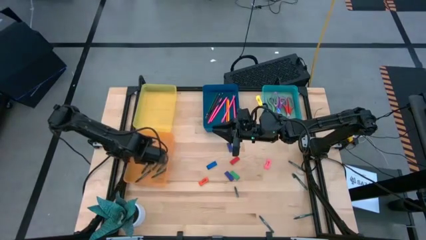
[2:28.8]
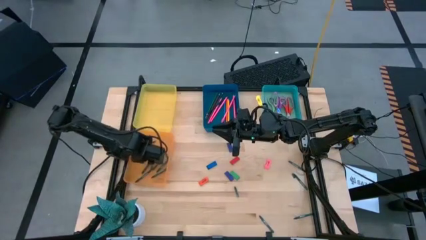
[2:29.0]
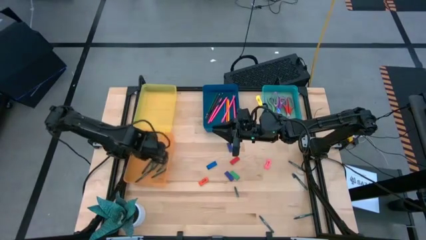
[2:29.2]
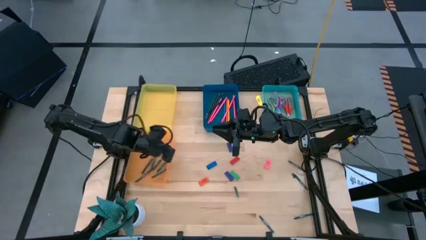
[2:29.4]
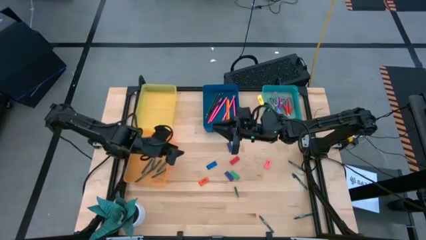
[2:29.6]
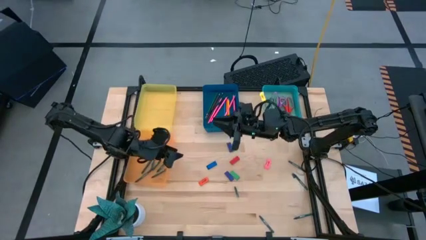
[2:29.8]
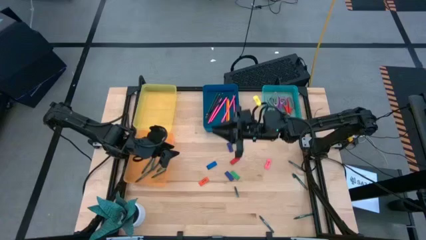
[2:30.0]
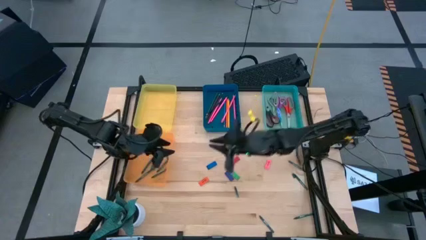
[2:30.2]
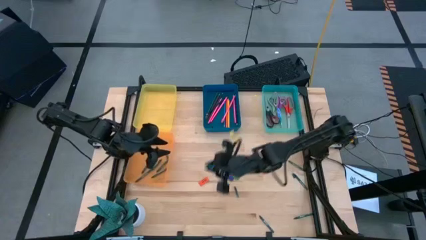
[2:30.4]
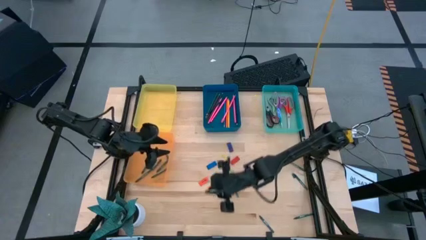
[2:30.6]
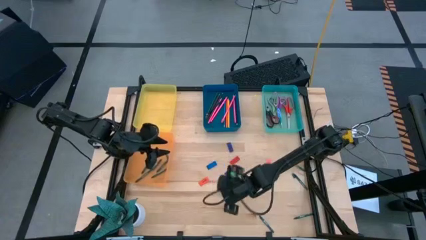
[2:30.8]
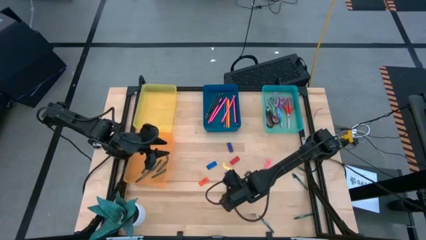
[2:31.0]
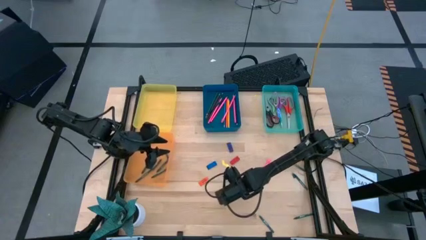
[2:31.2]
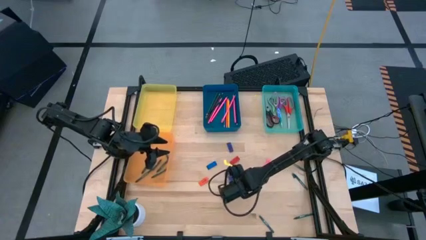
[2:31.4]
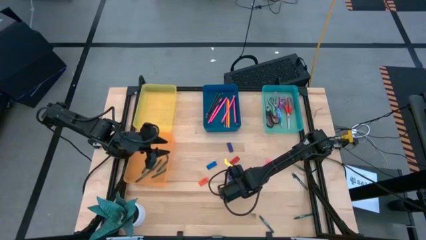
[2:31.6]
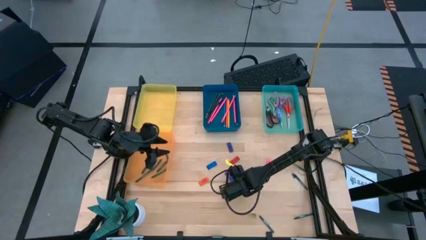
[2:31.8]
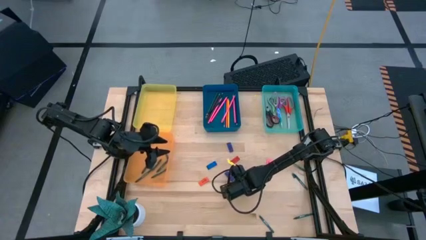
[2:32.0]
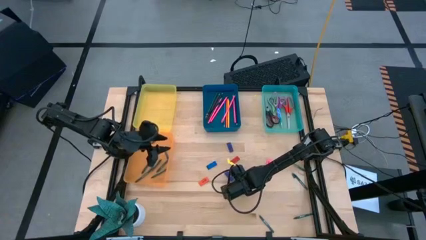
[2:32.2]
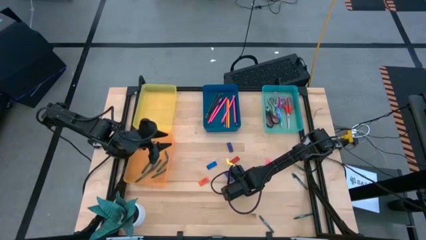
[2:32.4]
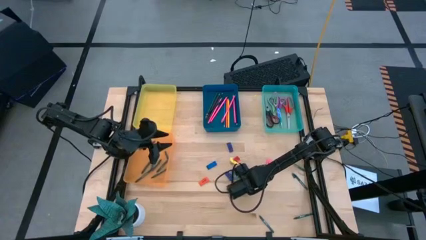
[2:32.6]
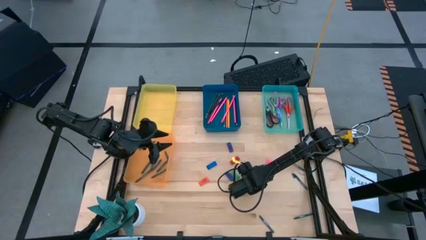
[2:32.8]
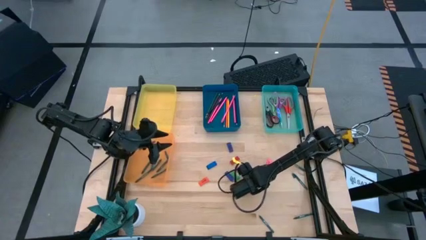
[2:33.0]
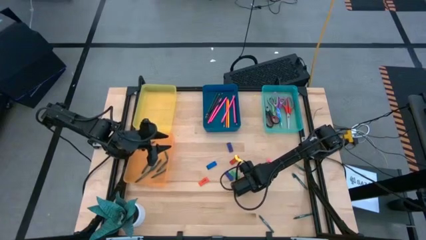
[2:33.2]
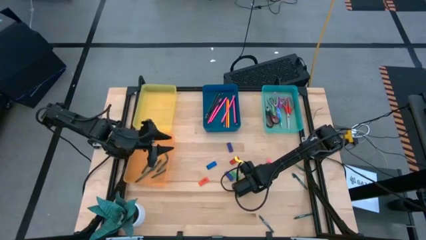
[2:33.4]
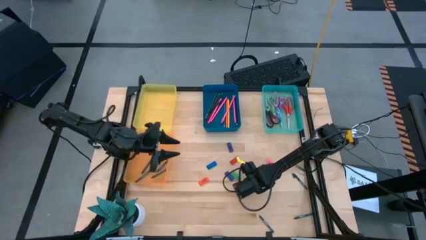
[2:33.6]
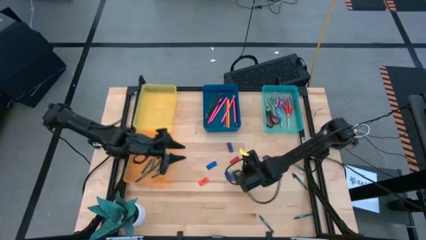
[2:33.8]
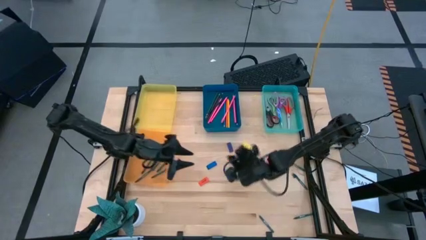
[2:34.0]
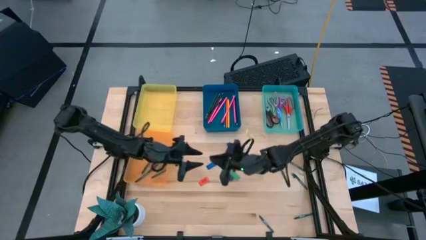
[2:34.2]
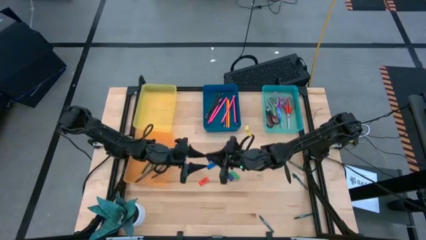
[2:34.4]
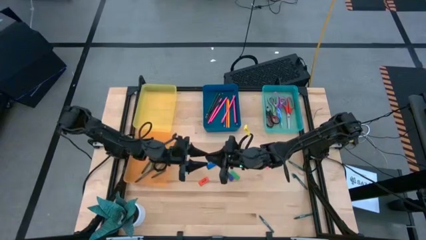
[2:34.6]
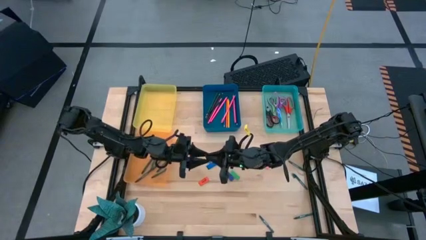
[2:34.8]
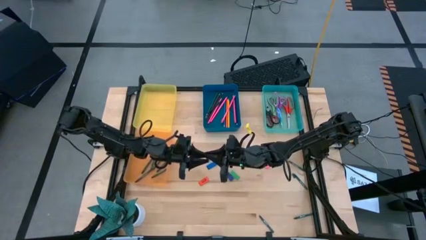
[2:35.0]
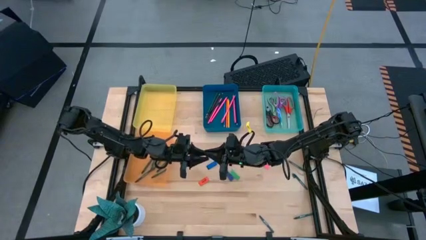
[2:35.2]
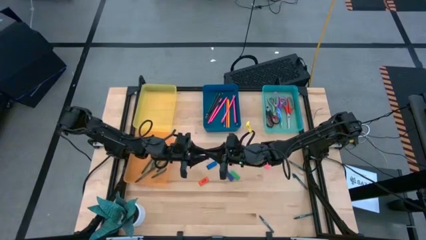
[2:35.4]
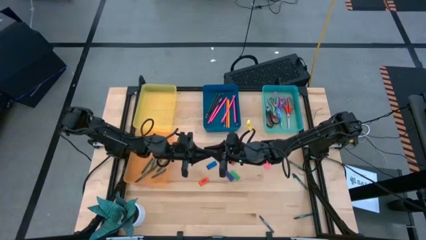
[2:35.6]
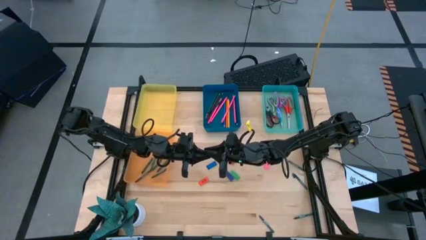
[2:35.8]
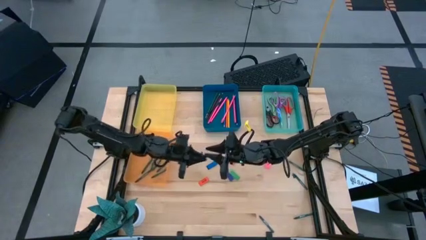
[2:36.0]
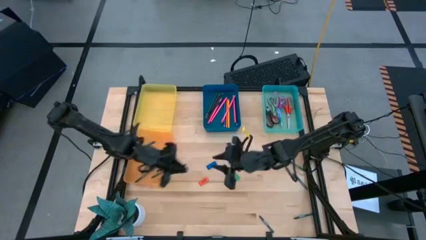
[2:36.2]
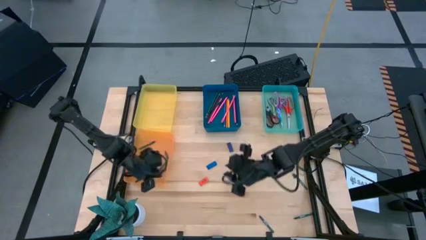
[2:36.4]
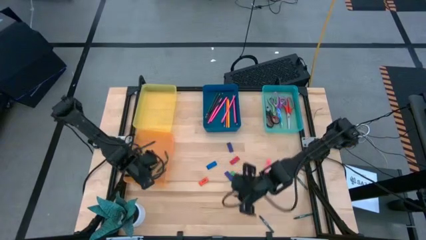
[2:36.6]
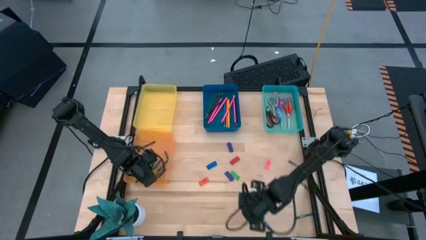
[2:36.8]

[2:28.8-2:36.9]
Task: Sort crayons/erasers/pens/pencils in bins
Put the green crayon into the orange bin

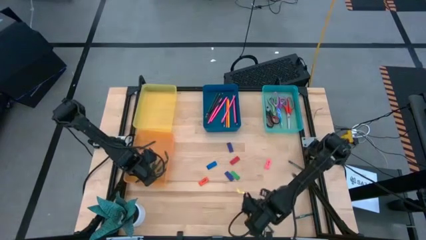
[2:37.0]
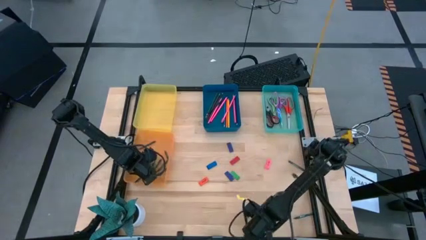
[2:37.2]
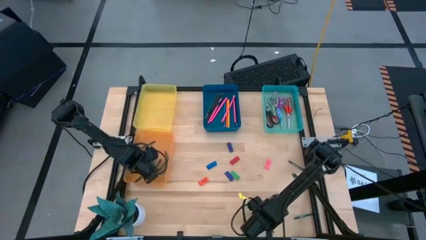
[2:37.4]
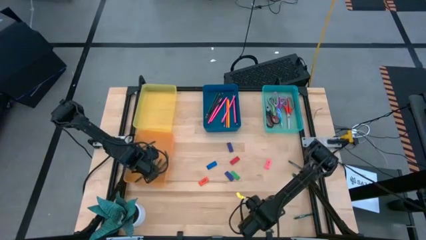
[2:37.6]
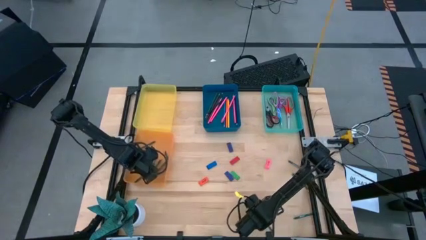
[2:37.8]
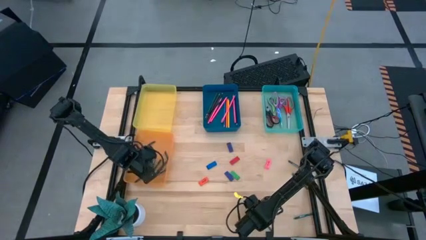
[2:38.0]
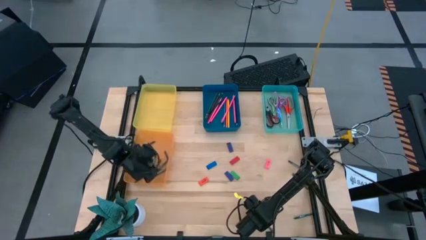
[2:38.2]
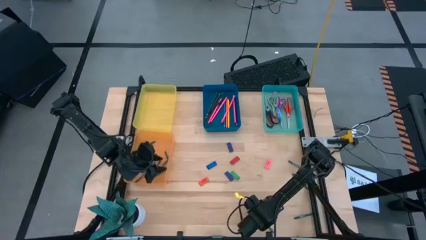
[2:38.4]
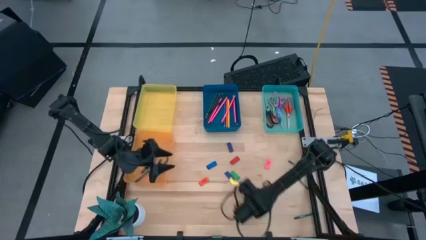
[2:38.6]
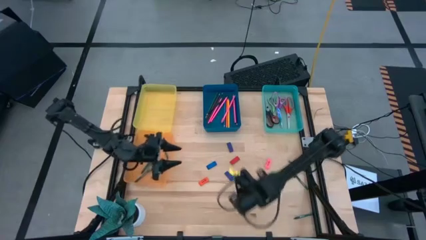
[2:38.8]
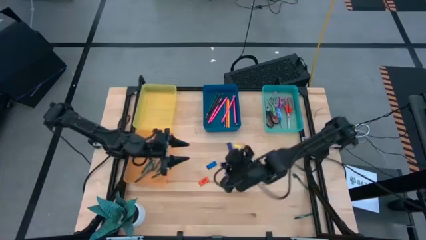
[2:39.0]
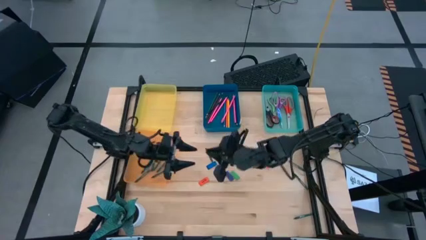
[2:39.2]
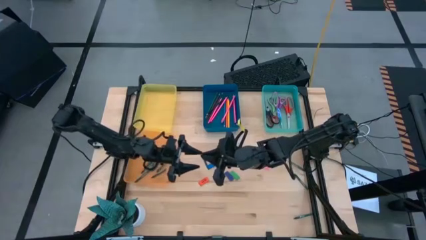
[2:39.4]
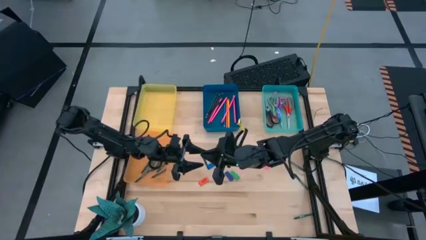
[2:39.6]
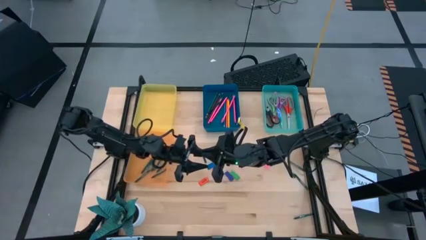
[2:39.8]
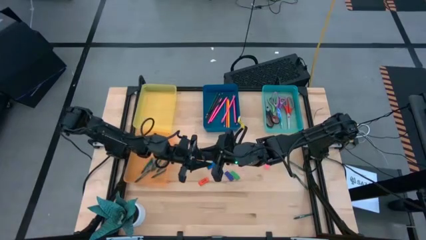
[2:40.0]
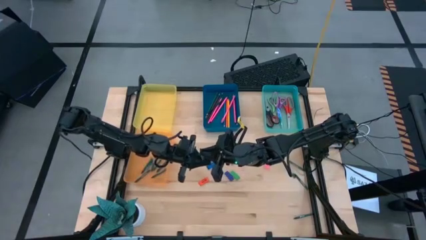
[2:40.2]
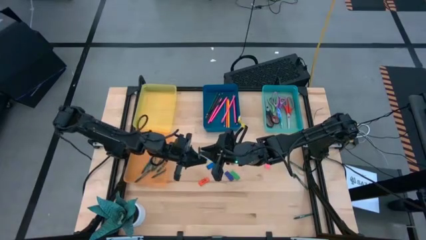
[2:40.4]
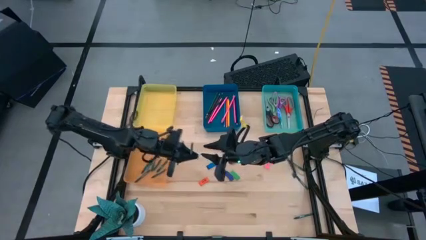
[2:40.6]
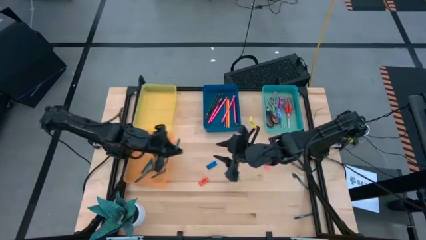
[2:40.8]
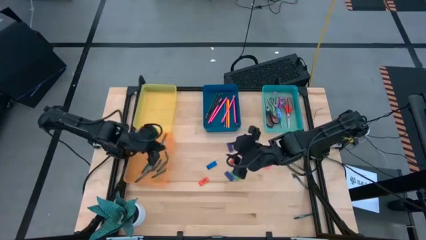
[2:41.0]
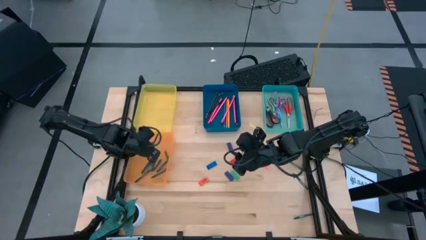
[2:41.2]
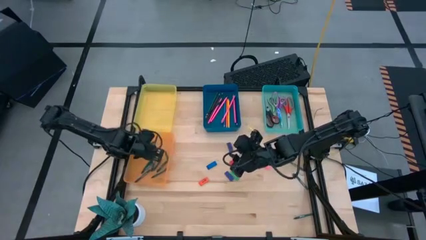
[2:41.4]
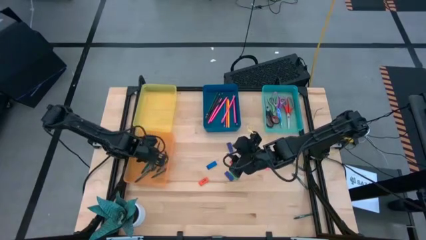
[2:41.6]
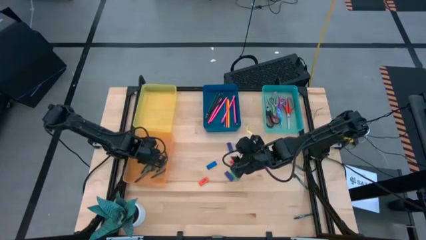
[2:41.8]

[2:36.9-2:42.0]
Put the left green crayon into the orange bin

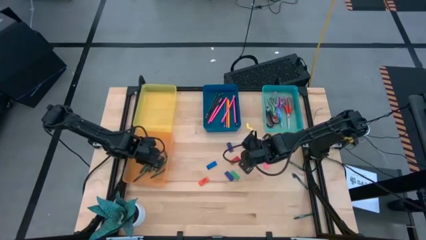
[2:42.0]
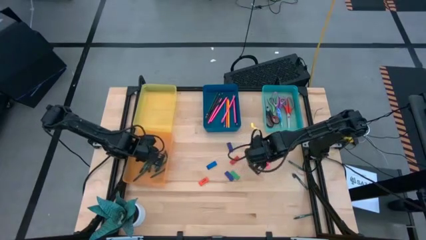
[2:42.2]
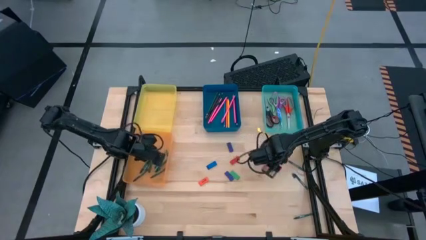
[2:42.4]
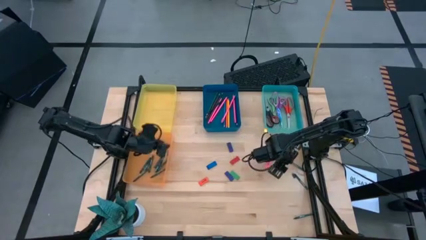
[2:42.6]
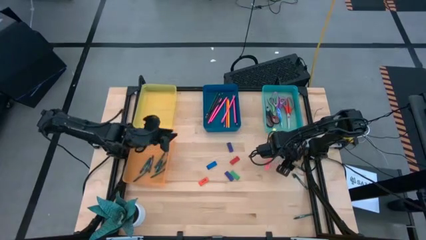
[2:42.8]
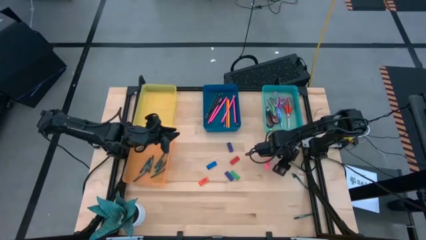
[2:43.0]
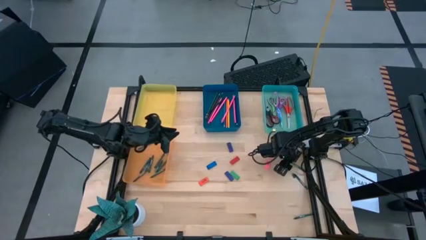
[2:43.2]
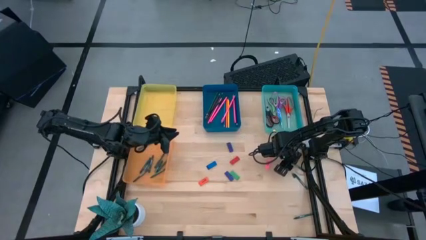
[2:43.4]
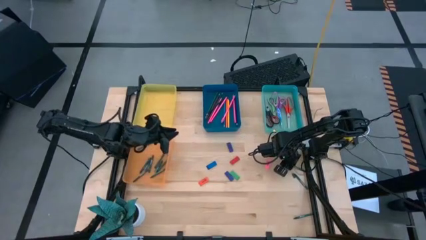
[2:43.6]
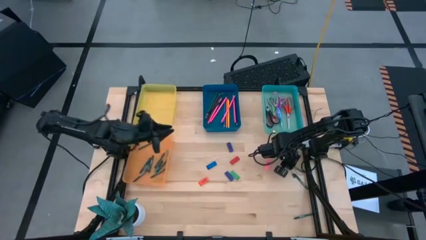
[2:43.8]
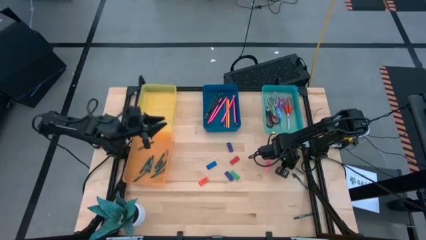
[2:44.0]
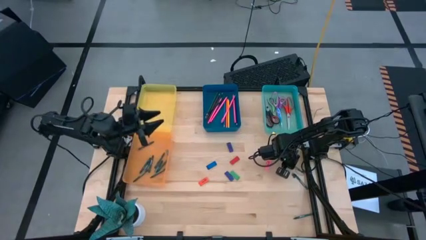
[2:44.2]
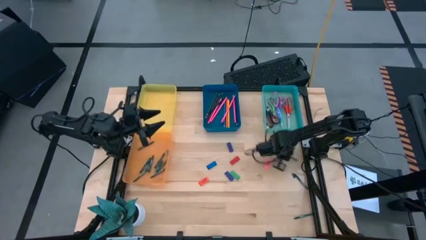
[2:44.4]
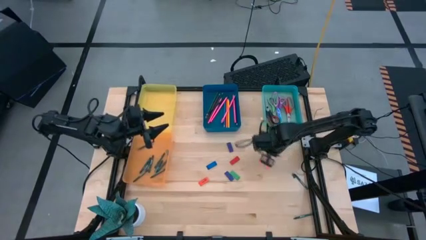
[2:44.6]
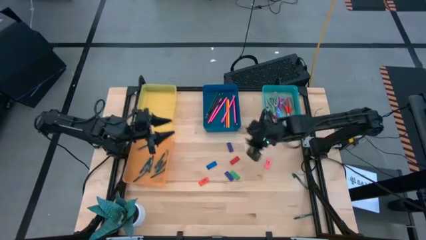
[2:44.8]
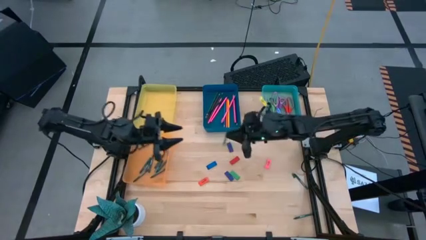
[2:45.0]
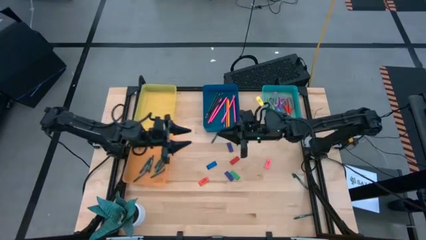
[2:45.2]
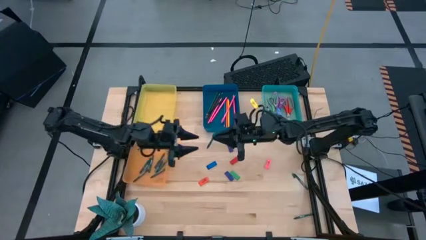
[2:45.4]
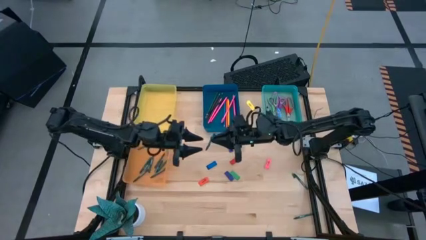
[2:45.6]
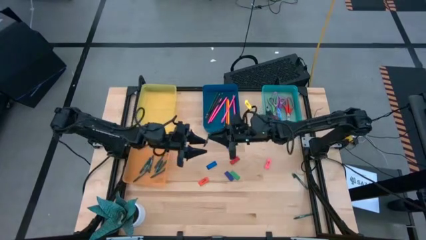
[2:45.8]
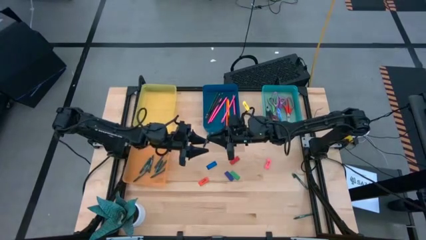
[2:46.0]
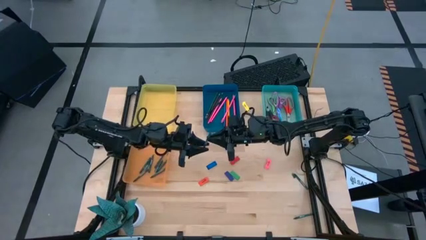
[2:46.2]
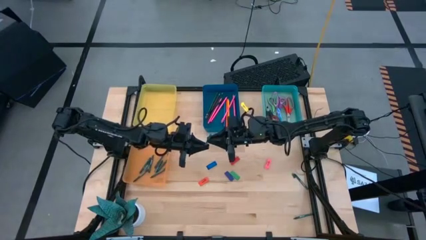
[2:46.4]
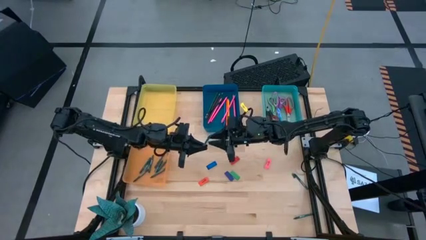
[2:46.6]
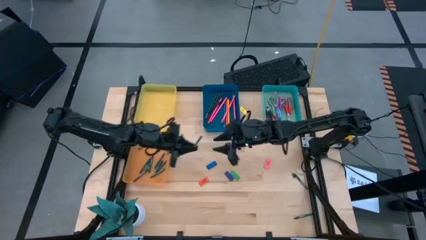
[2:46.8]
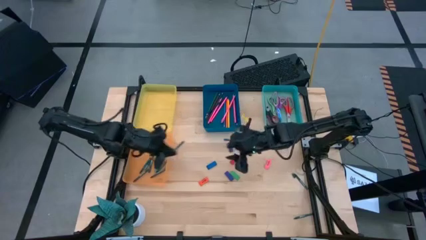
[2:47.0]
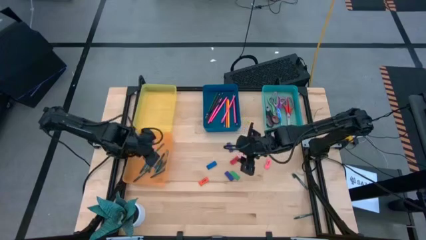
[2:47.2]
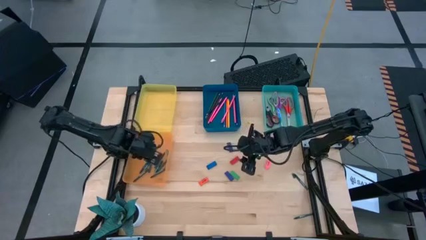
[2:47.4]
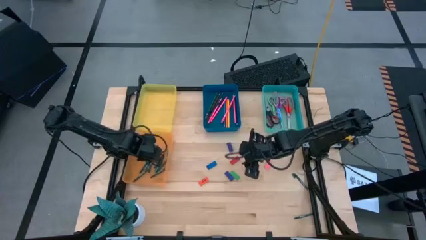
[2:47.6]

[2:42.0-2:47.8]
Put the top green crayon into the orange bin
